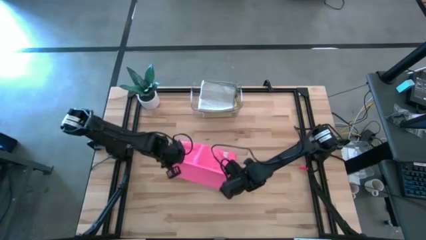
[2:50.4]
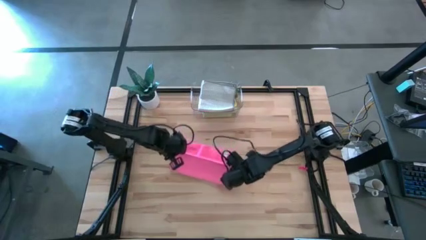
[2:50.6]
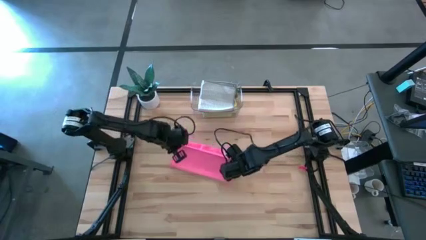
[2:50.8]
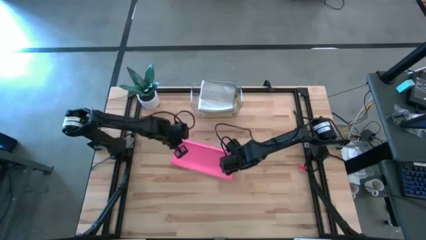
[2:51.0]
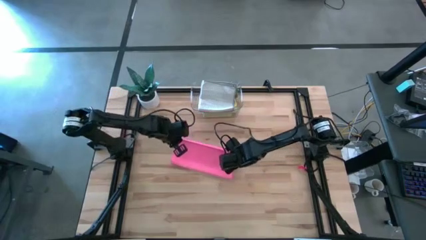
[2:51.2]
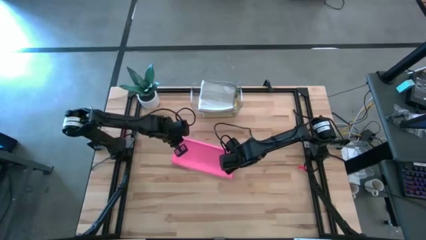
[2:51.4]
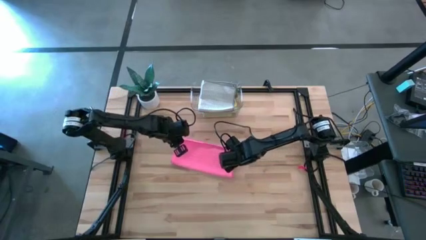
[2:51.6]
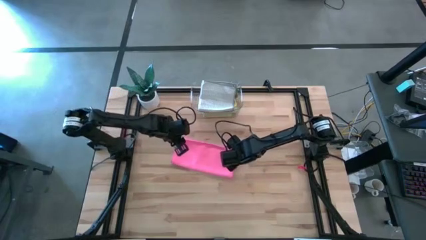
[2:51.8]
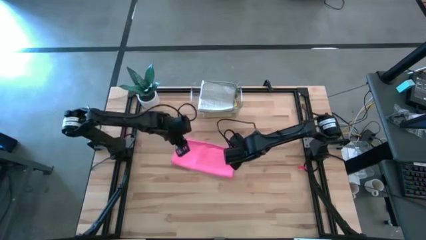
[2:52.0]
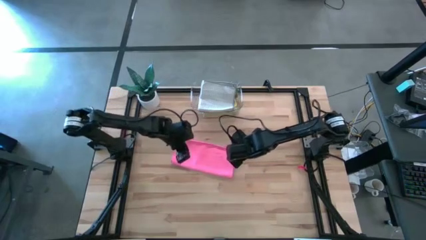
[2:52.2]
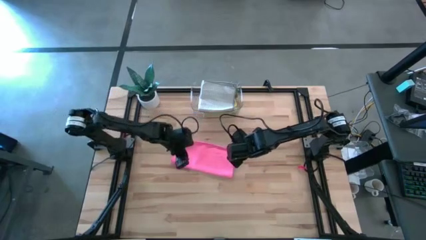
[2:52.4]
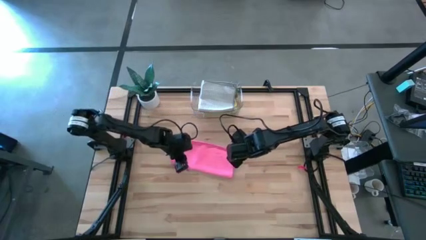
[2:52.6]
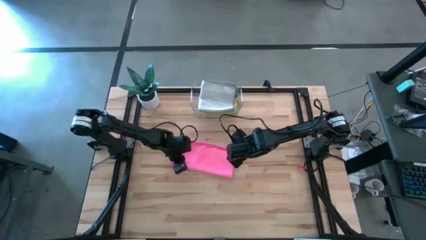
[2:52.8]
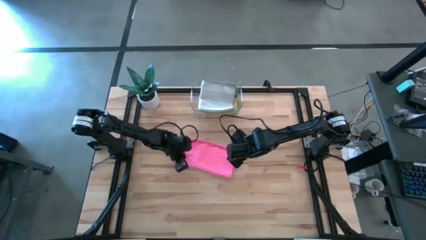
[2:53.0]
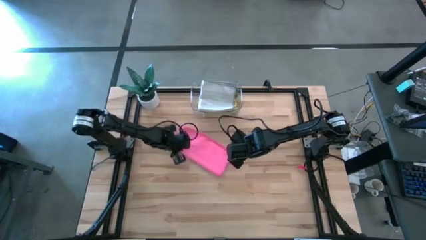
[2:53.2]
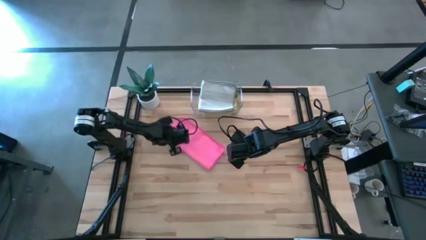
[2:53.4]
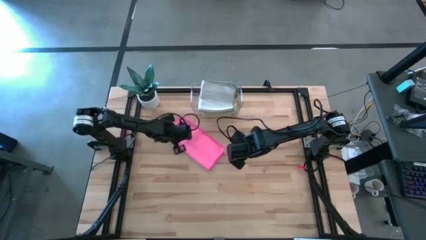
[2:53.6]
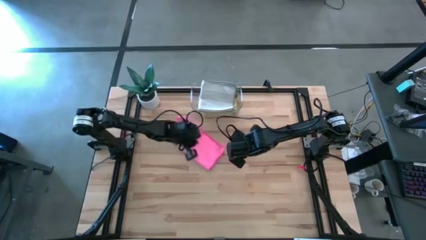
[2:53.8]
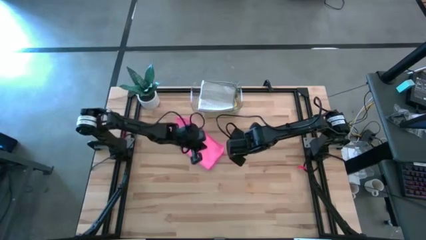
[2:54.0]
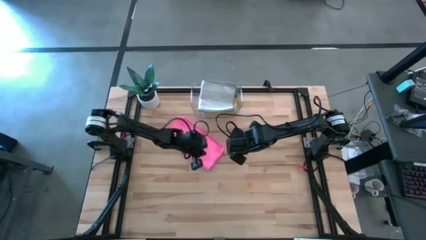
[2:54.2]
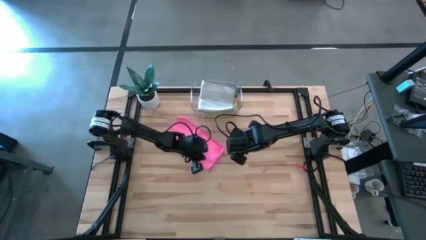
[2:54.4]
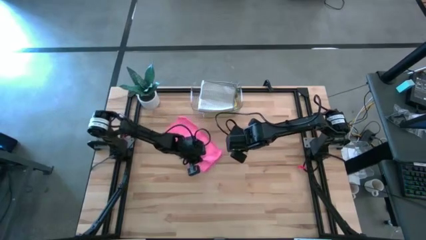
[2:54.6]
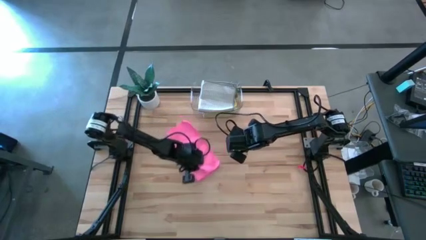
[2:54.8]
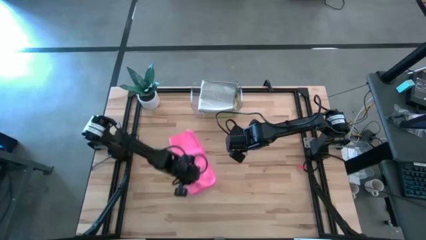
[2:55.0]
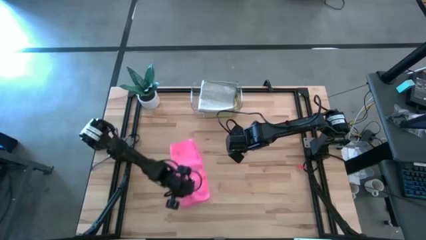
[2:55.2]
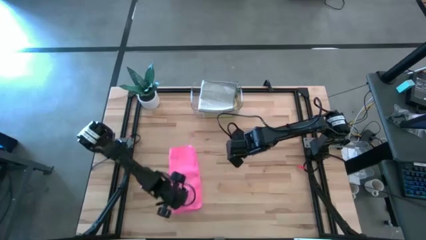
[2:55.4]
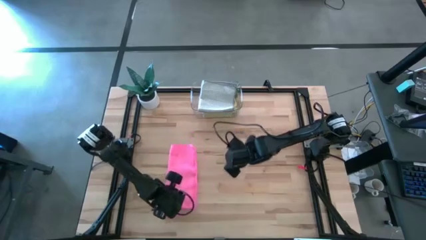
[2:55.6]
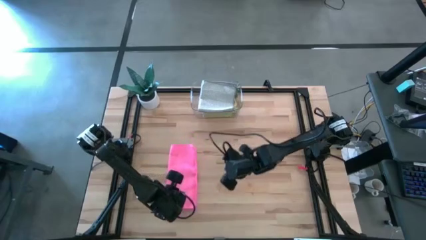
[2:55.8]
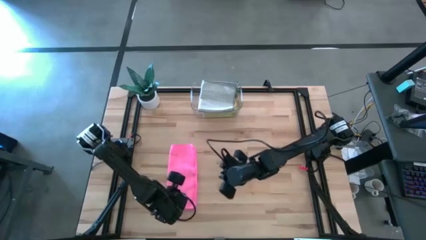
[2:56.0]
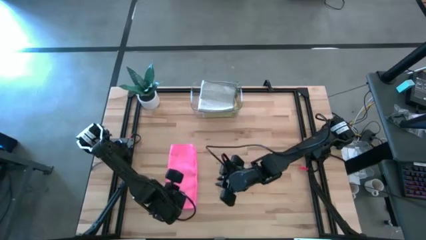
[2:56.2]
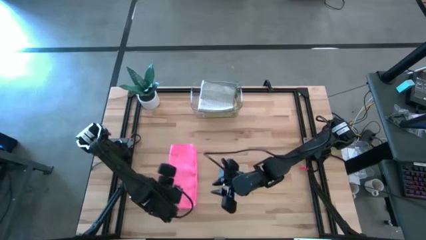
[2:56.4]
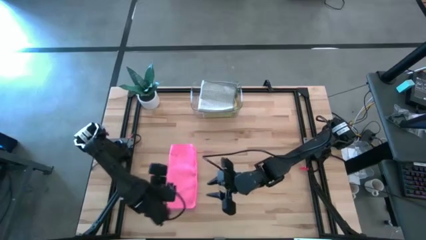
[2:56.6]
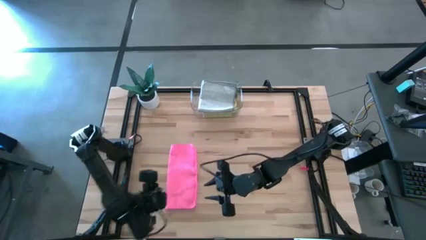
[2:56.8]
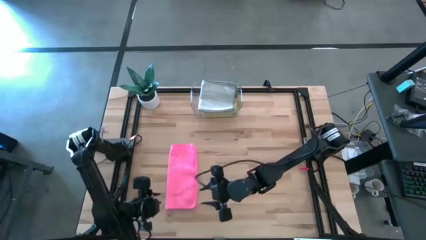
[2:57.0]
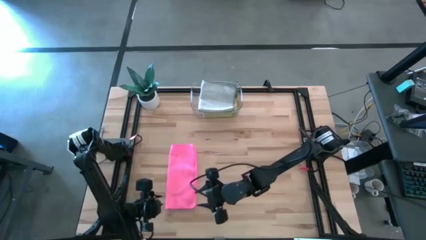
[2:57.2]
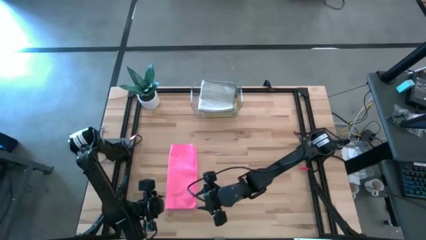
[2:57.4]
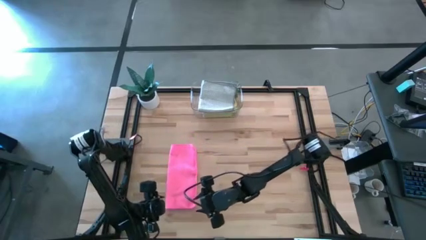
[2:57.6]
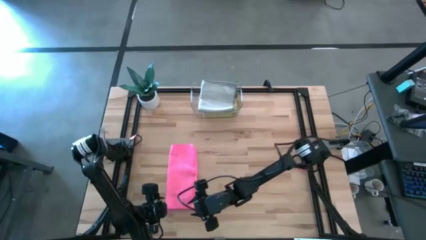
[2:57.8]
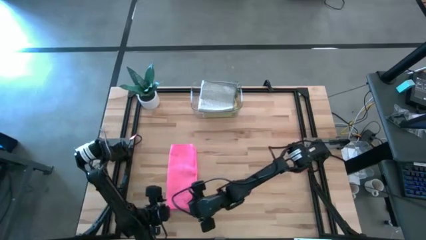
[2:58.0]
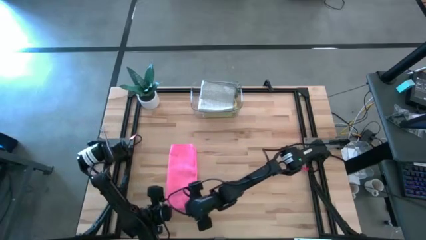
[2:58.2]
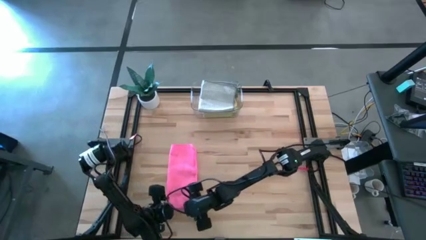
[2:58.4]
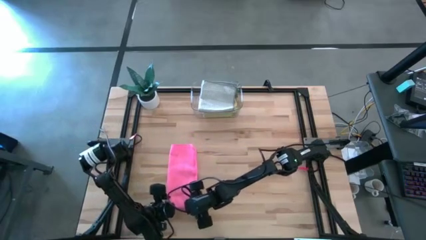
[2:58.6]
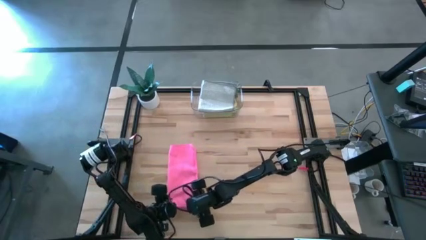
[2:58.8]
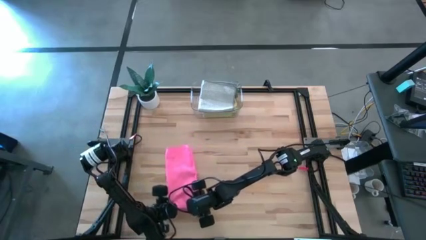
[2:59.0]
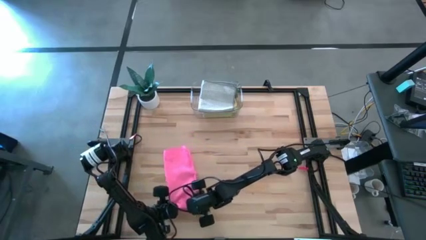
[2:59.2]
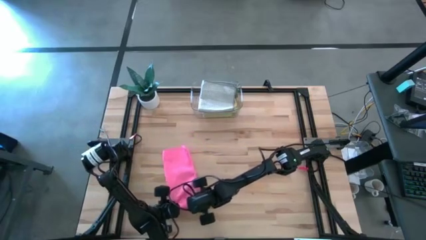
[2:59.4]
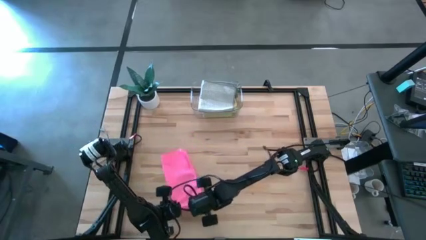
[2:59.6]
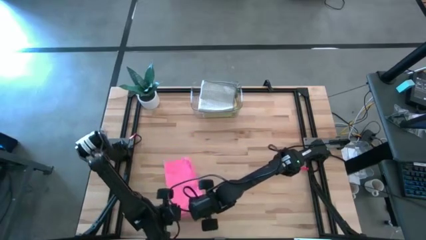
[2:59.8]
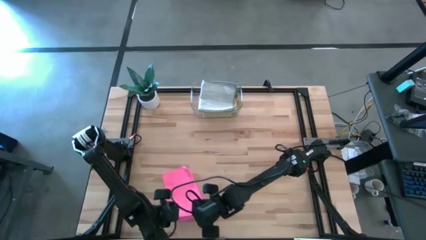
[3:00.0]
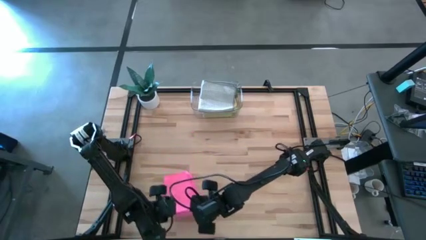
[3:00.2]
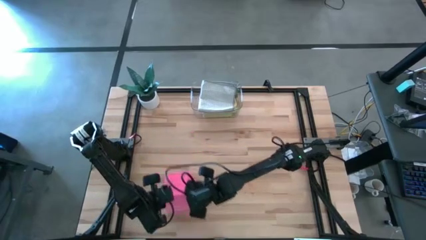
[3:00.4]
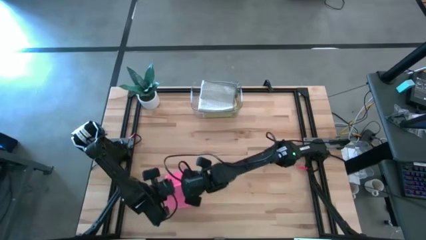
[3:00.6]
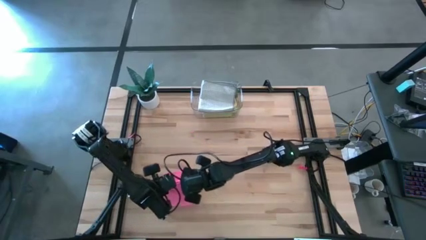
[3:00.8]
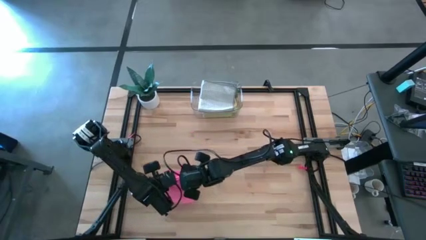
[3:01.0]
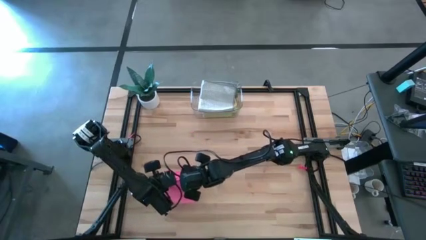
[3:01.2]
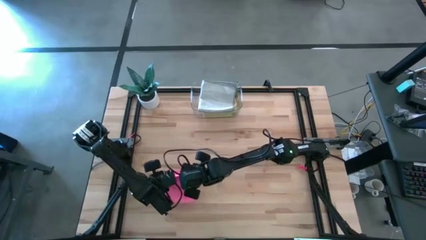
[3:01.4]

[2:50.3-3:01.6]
Task: Fold microfiber towels
Fold the pink microfiber cloth

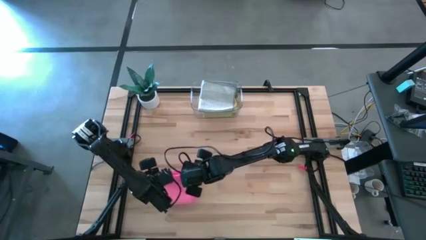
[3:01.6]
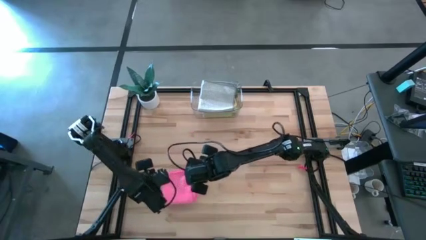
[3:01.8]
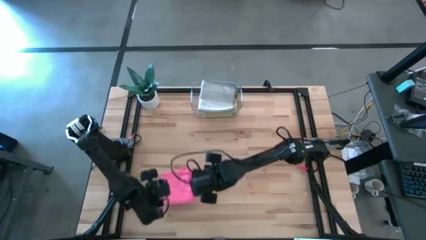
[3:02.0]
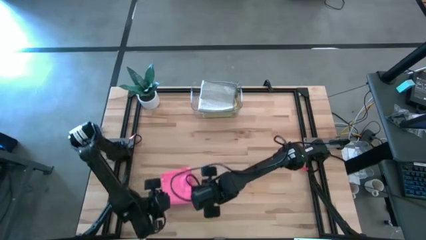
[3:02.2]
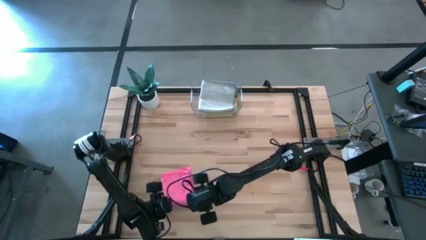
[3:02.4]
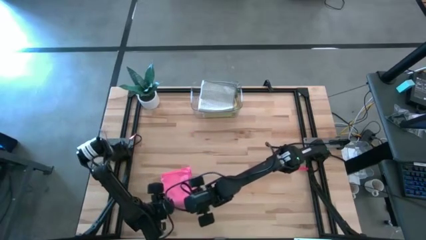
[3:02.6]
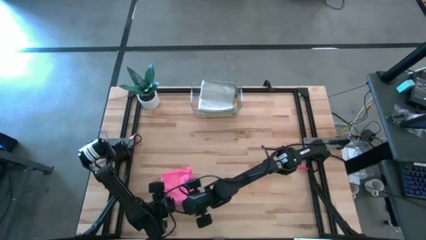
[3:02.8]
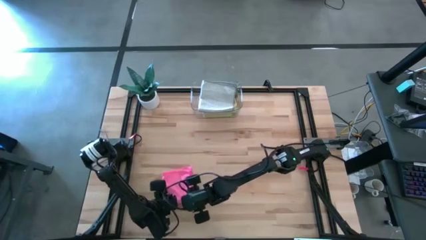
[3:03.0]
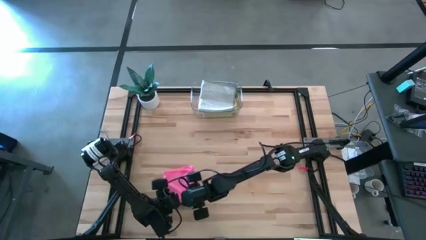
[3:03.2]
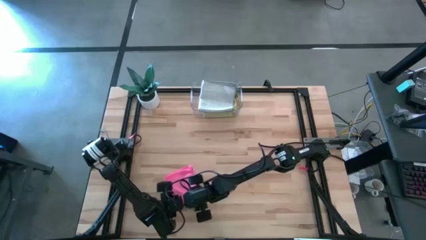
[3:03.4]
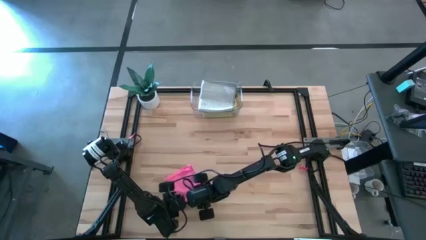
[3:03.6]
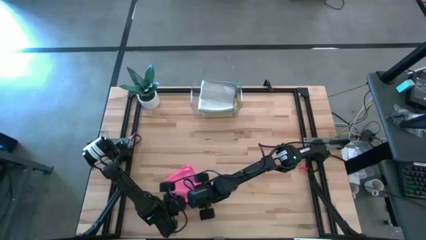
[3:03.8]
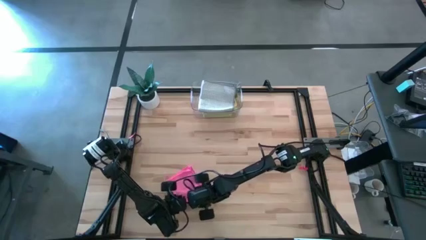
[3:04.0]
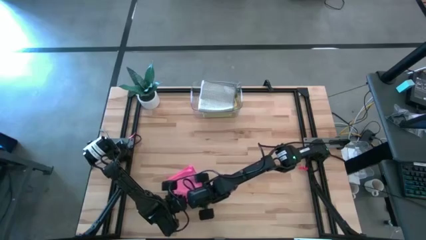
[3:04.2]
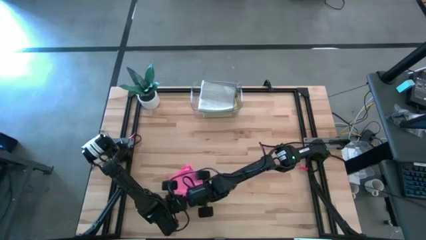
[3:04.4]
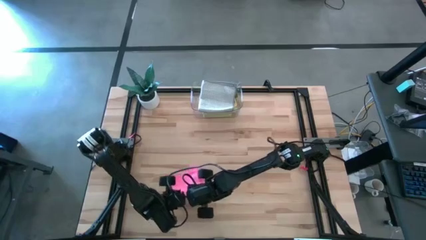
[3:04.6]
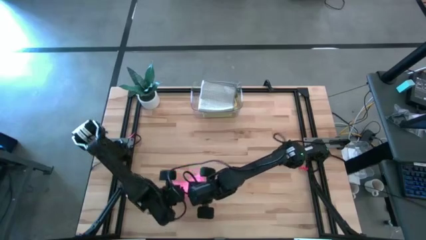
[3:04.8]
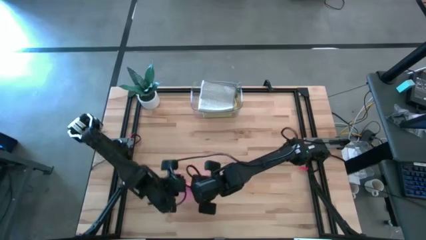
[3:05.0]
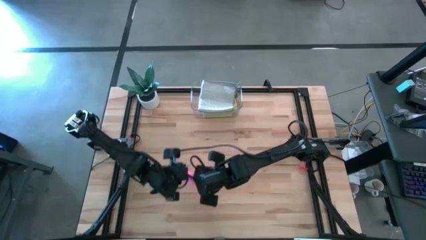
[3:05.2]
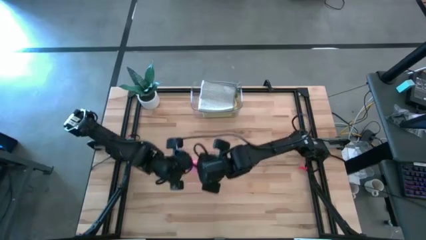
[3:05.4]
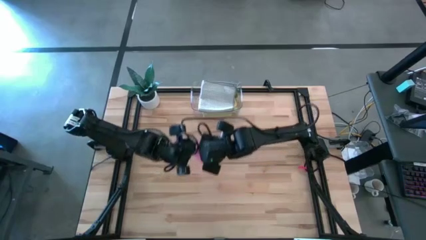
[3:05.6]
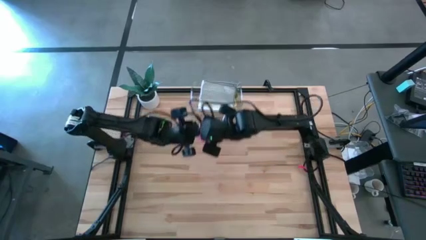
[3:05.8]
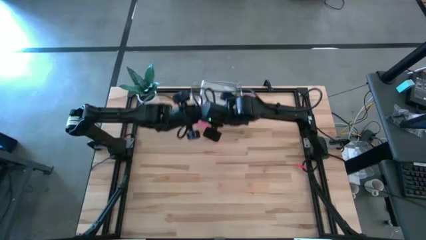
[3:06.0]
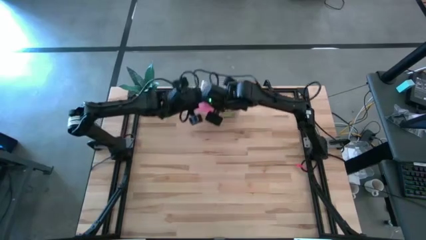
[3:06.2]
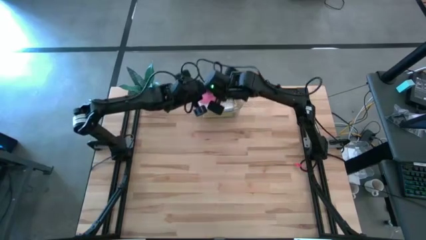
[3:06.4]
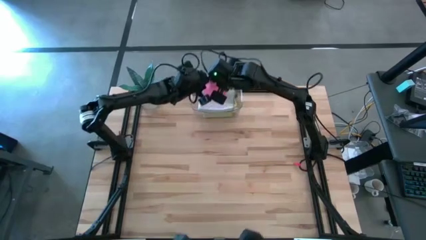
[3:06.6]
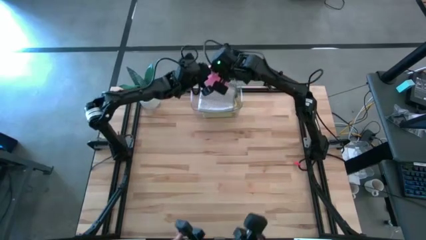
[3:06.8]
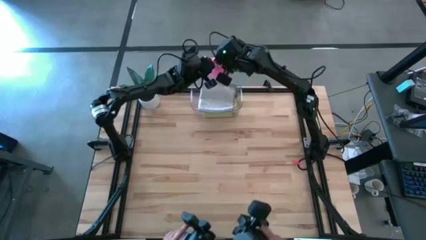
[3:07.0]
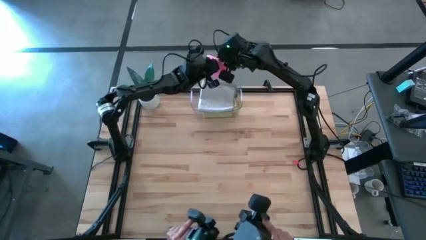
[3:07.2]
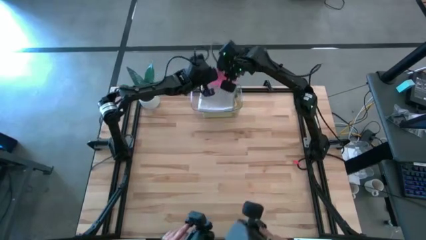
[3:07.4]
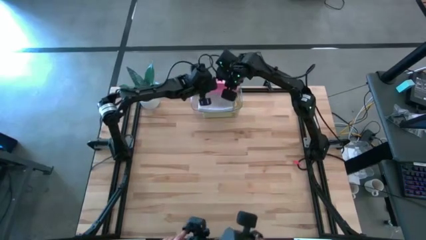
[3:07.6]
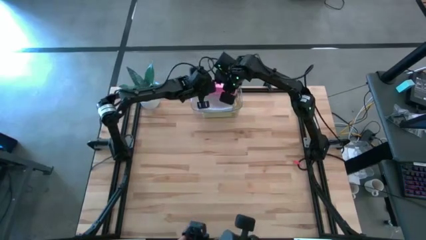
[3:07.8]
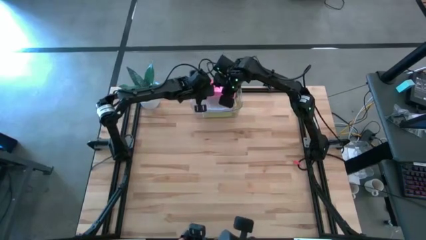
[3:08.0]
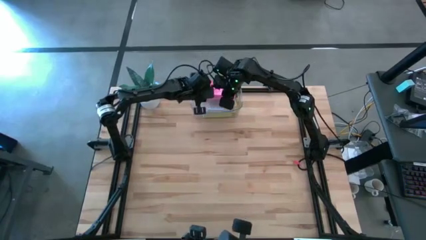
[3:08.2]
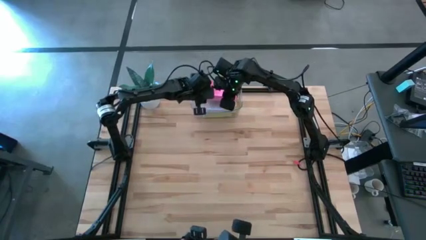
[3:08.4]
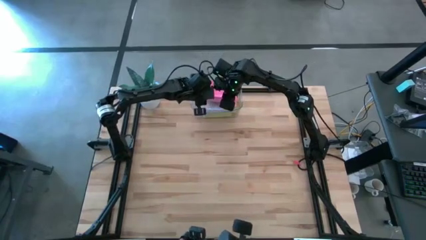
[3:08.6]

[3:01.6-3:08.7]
Put the pink microfiber cloth into the transparent bin
